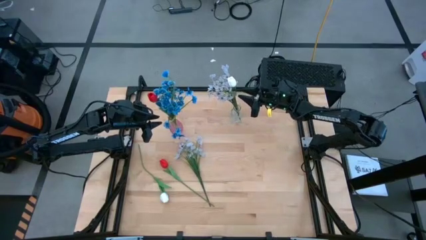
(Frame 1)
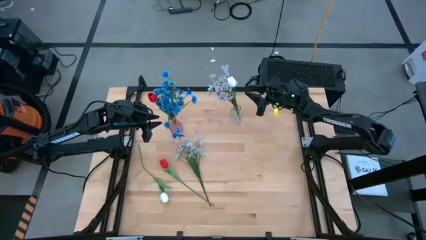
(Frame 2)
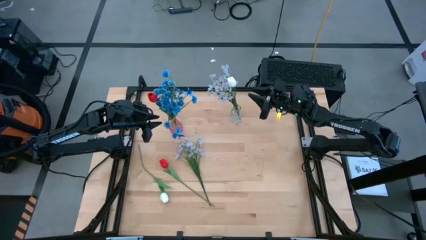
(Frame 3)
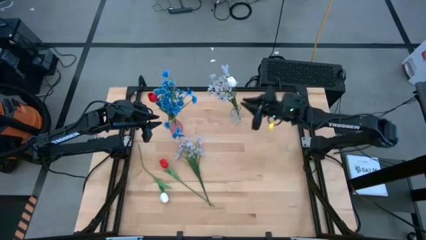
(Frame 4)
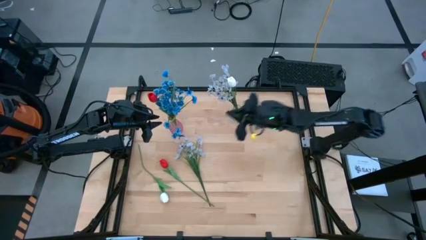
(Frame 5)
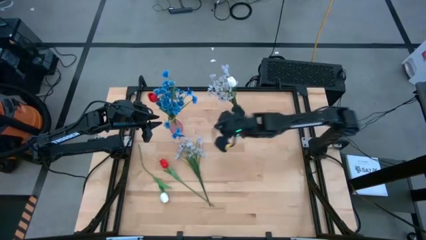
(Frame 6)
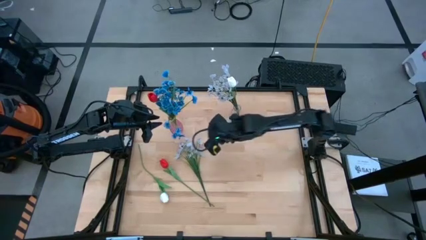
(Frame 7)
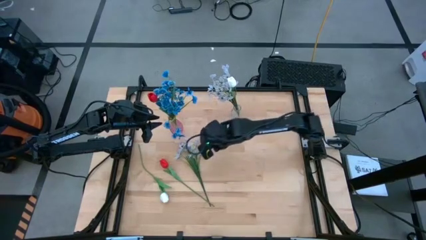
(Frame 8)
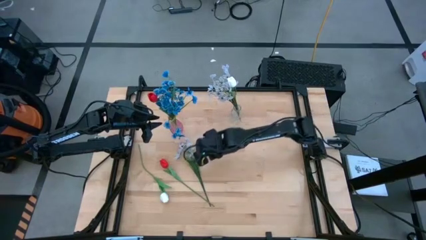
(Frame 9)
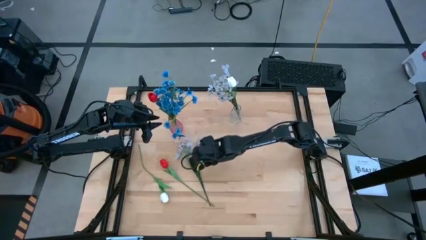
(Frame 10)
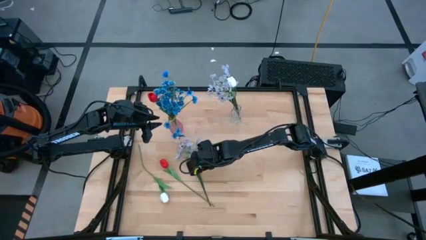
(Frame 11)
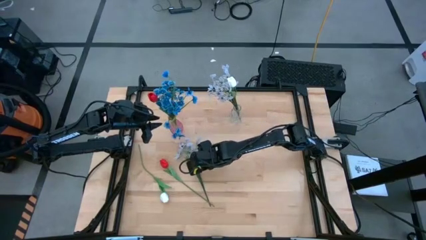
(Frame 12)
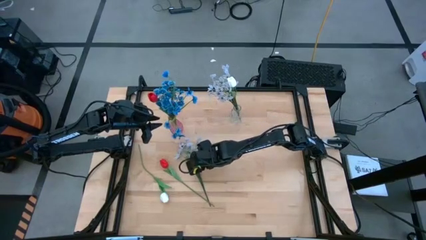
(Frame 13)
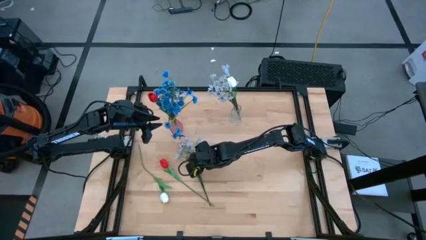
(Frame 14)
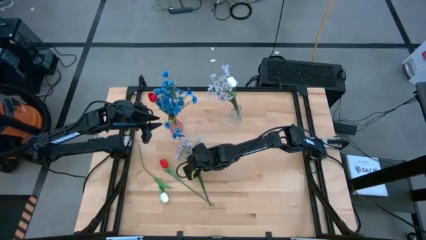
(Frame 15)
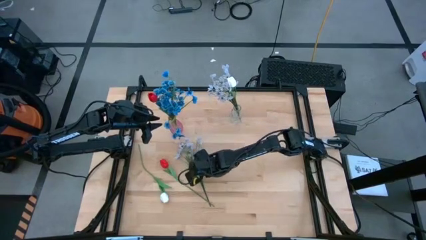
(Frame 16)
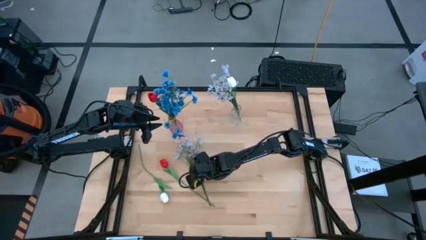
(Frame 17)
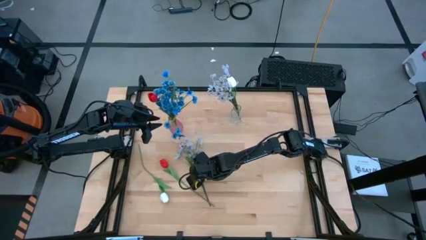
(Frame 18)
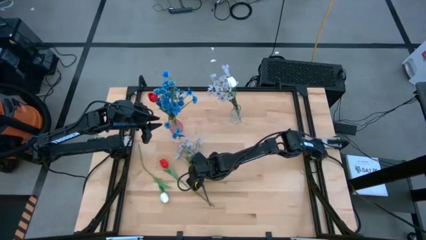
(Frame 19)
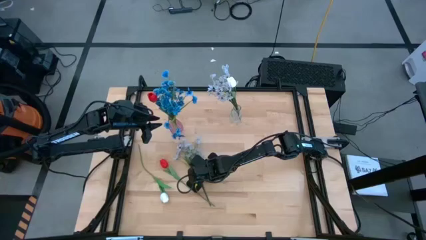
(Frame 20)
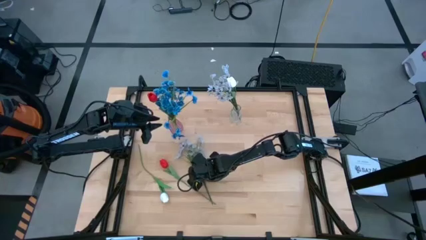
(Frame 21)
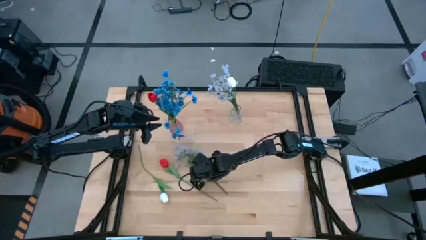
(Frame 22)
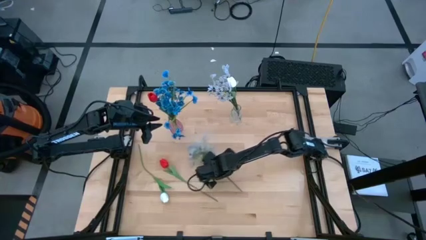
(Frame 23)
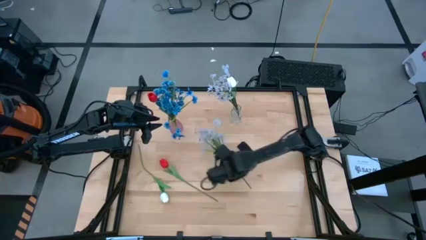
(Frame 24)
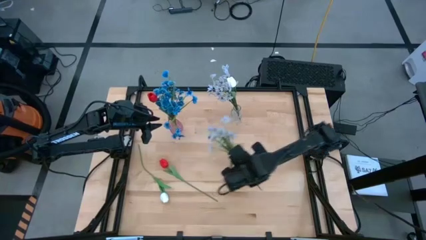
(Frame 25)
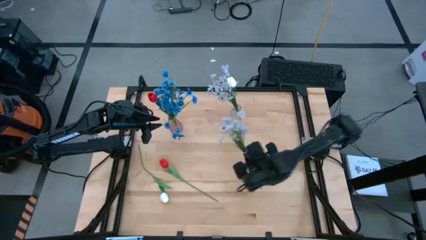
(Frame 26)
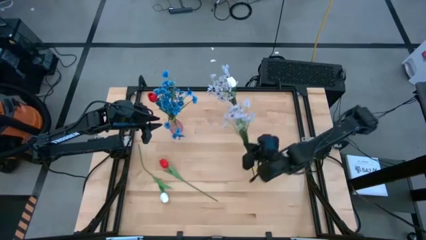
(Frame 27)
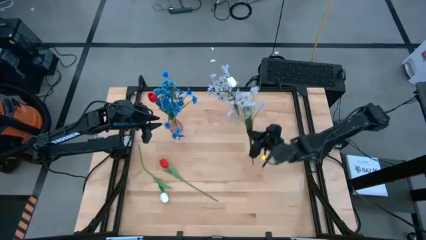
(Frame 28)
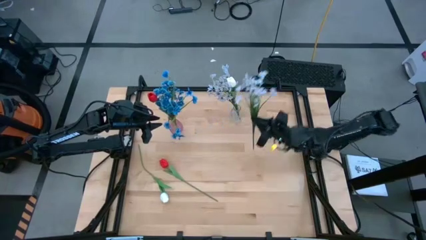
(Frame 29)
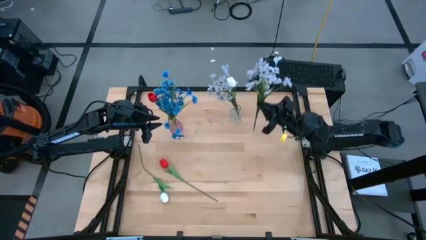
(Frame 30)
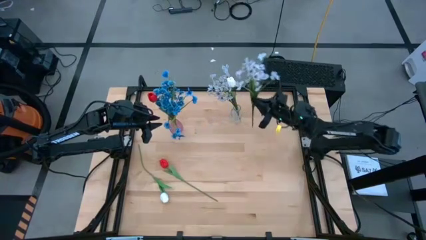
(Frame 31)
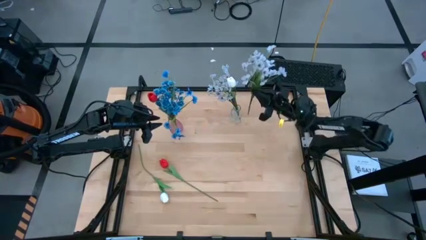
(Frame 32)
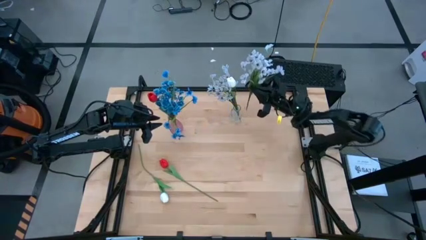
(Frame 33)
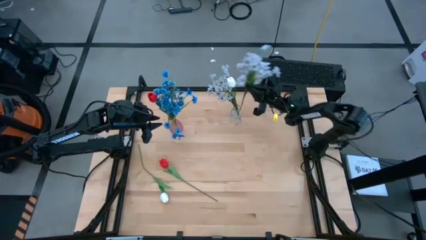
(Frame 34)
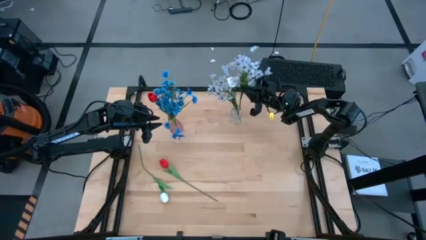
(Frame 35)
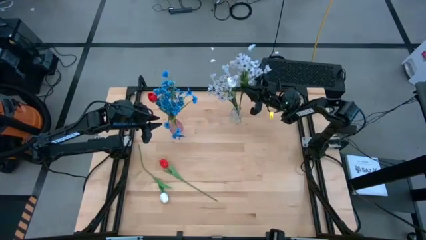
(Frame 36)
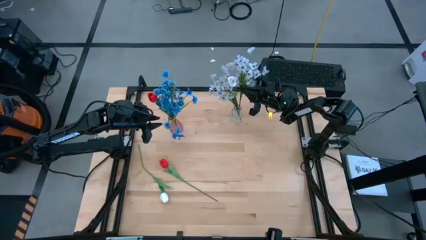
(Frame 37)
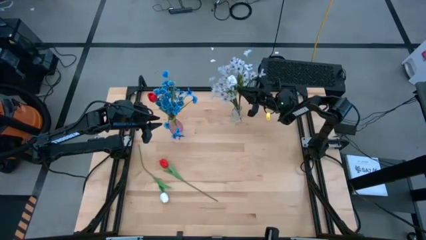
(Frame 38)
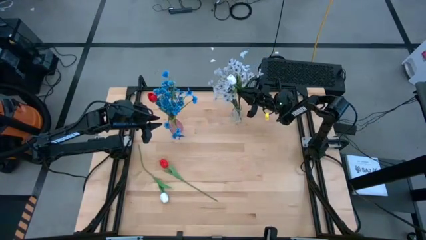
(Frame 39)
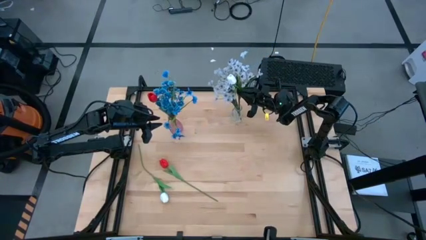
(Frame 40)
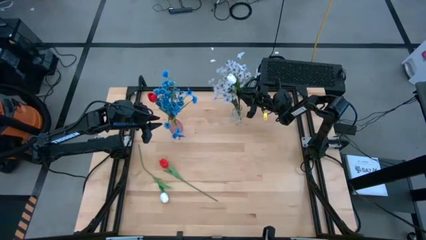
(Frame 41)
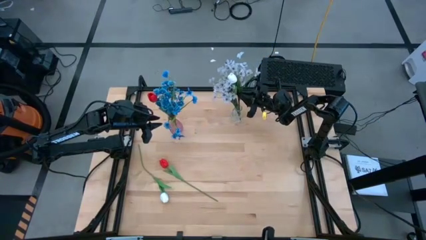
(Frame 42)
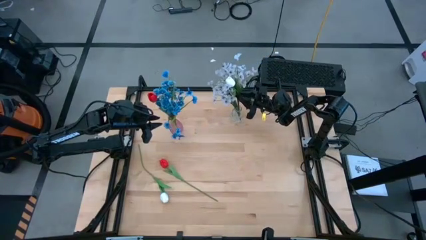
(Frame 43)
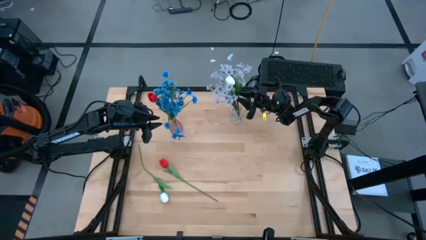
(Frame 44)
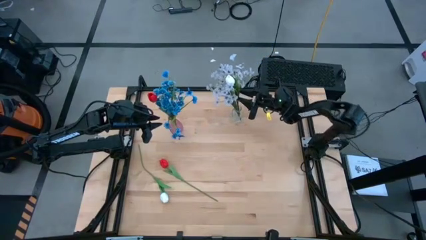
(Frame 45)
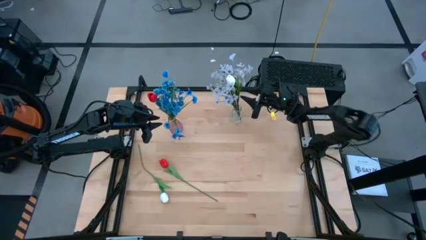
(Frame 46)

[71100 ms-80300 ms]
Task: Sort flowers into vase by color
Put the white flowers into the transparent vase

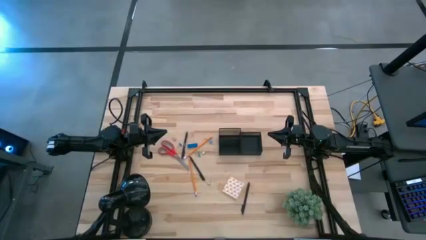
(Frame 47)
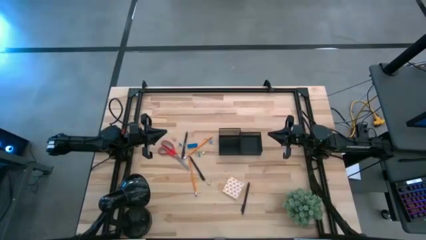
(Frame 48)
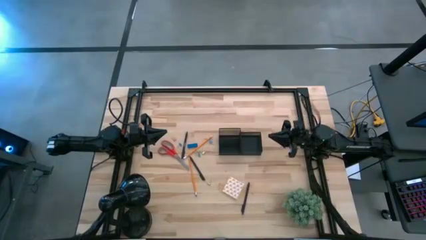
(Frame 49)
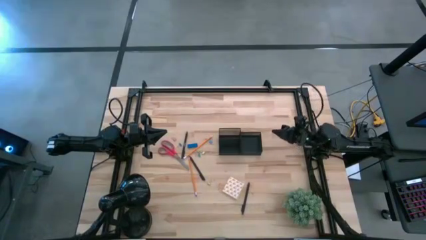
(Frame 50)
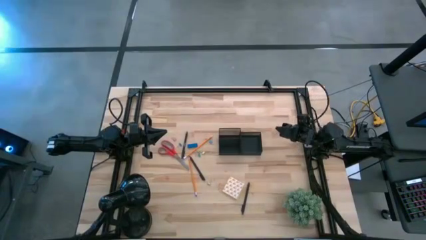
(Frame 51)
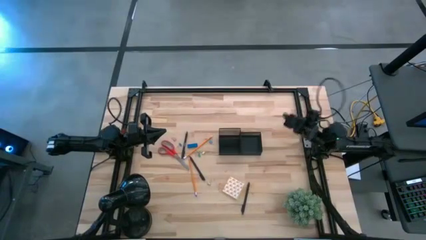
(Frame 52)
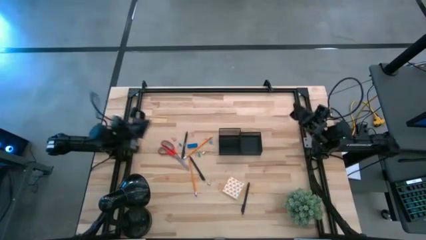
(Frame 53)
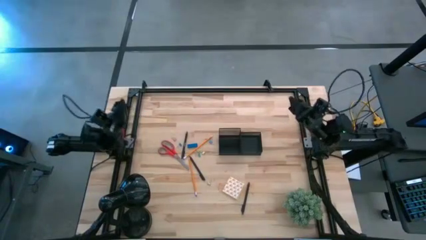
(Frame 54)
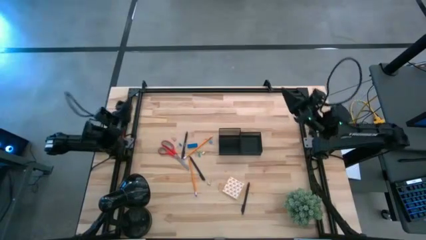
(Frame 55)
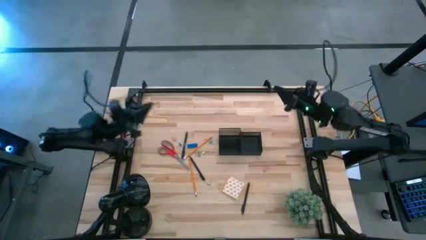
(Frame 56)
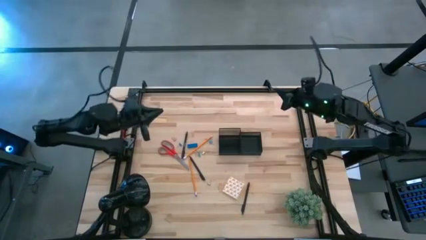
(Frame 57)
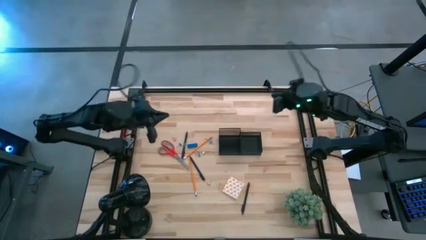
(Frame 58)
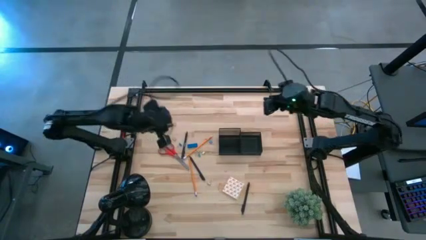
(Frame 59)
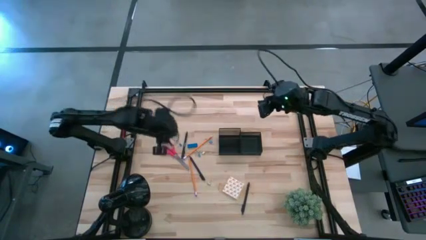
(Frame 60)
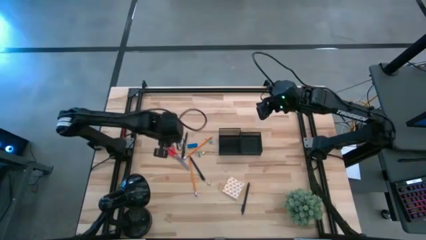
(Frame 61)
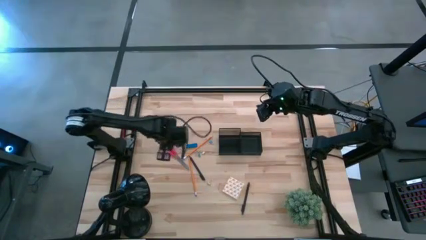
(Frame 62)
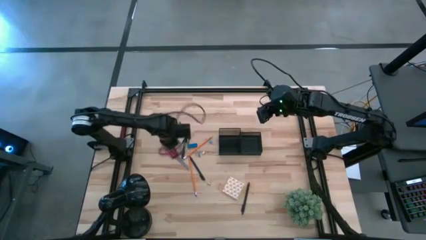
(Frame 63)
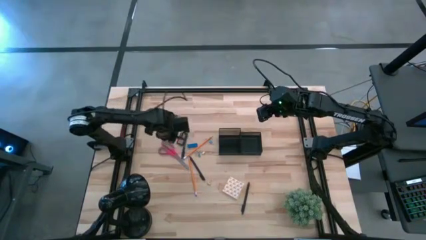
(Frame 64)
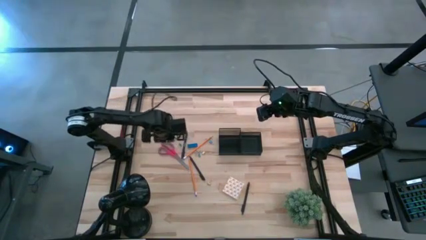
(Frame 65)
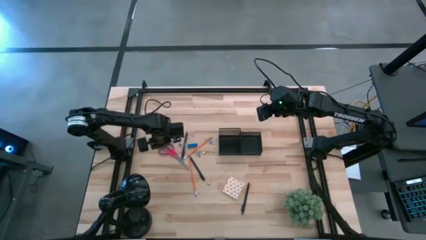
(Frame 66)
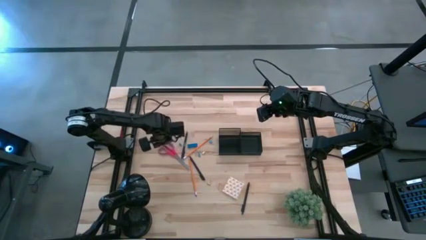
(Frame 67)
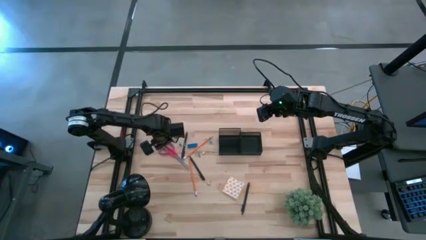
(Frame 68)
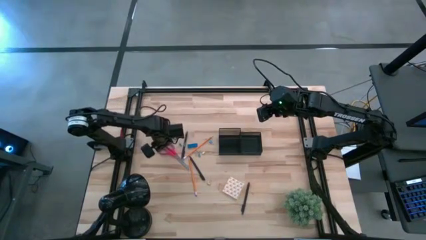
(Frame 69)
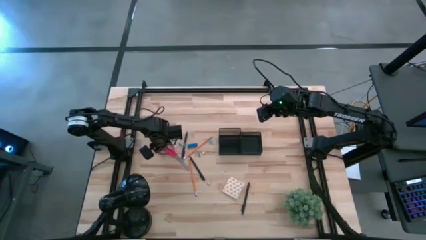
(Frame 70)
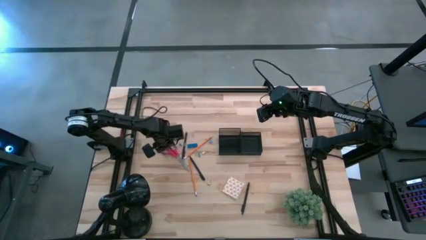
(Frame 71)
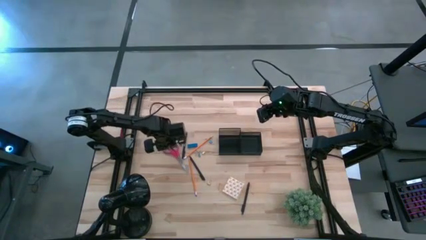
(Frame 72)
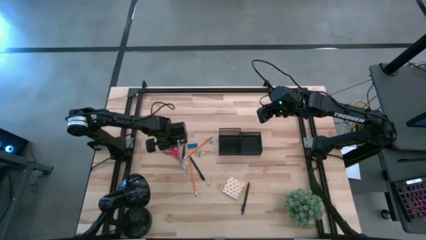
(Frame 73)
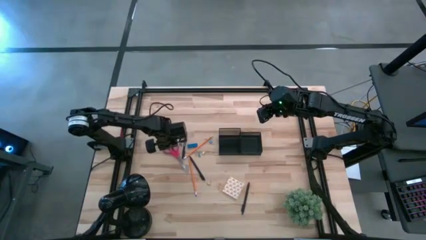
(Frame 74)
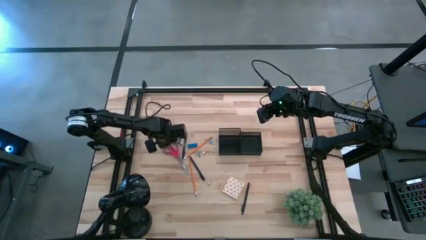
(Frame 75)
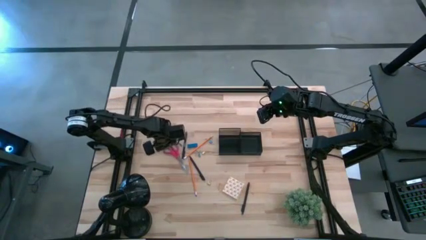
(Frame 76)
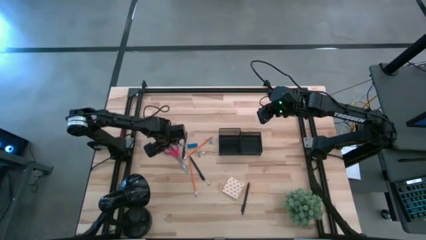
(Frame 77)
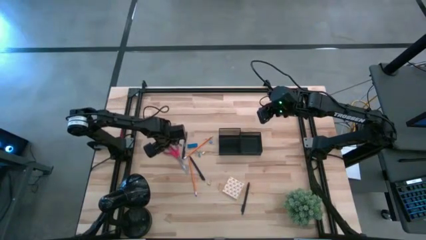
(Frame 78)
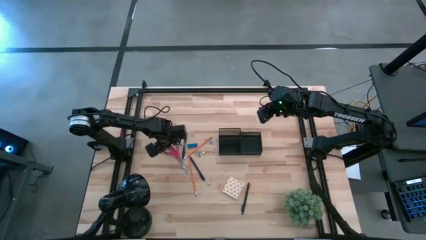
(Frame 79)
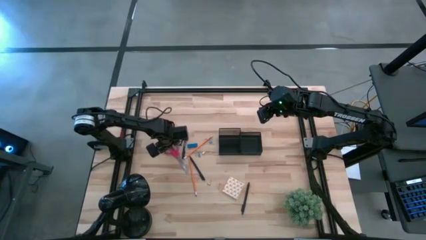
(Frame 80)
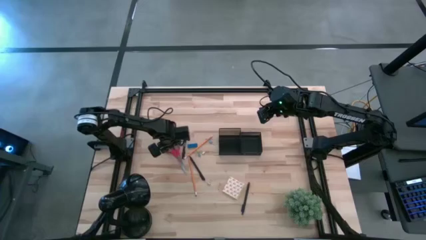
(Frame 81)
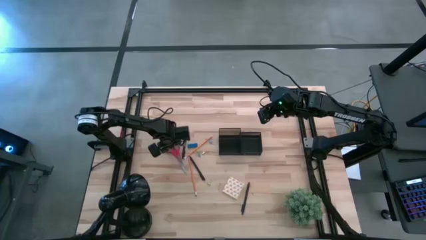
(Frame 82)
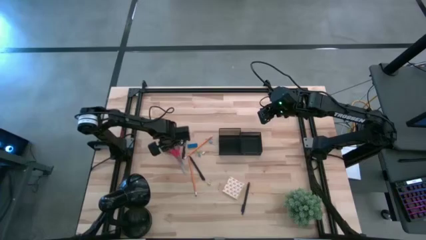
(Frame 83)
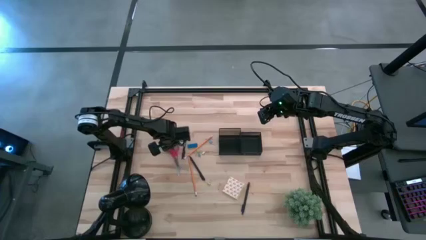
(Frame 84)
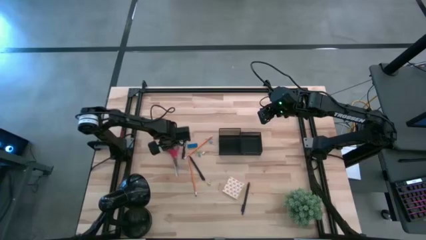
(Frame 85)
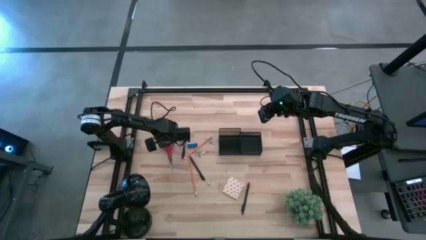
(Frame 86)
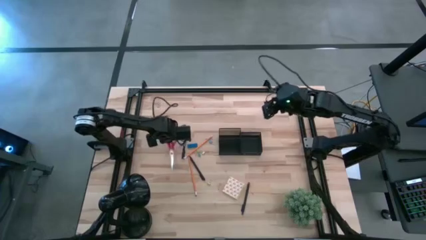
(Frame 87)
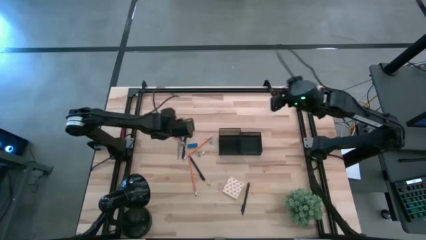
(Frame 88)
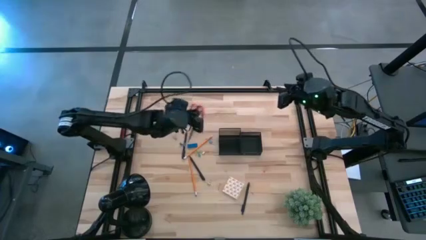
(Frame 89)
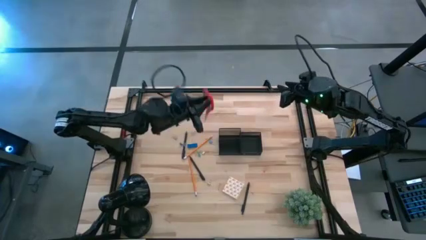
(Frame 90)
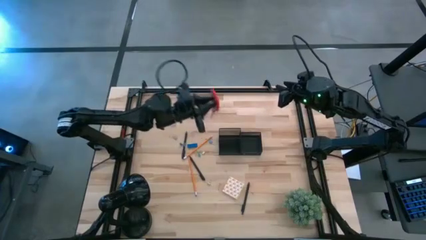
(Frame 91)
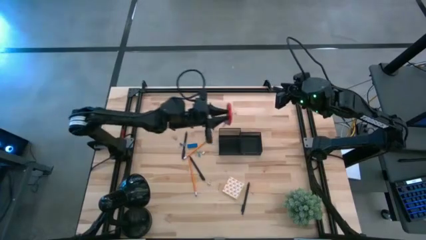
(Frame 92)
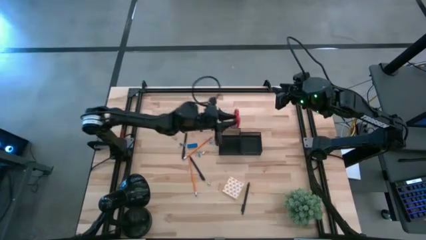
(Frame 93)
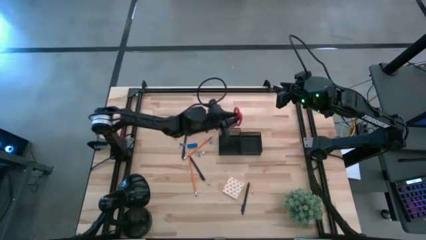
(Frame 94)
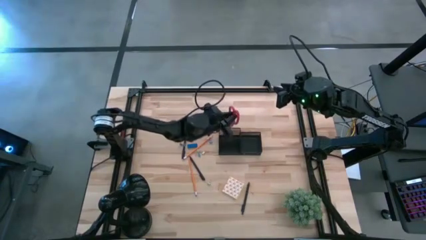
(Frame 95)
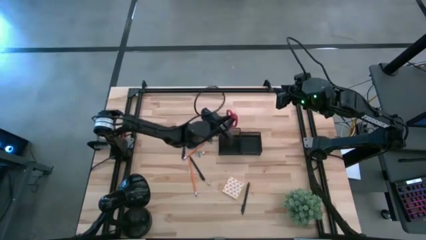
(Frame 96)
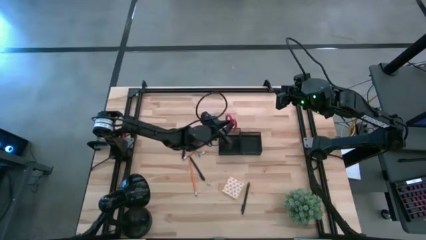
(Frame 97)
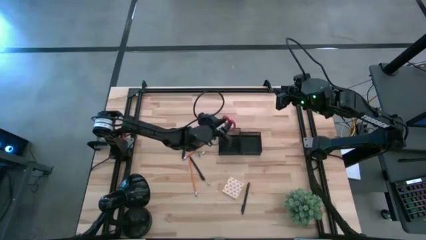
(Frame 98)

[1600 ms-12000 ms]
Task: Pick and place office supplies into organizer
Put the orange scissors into the desk organizer
